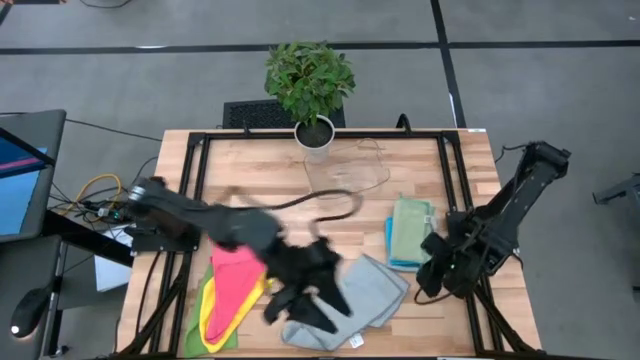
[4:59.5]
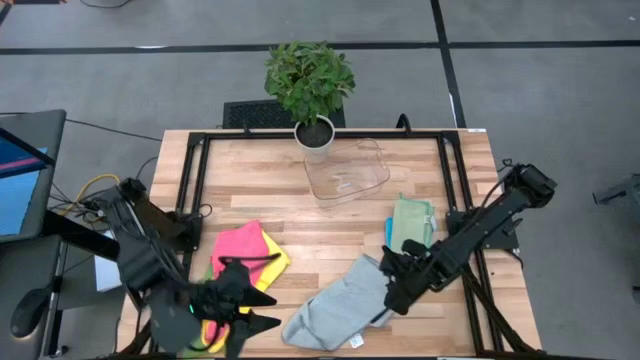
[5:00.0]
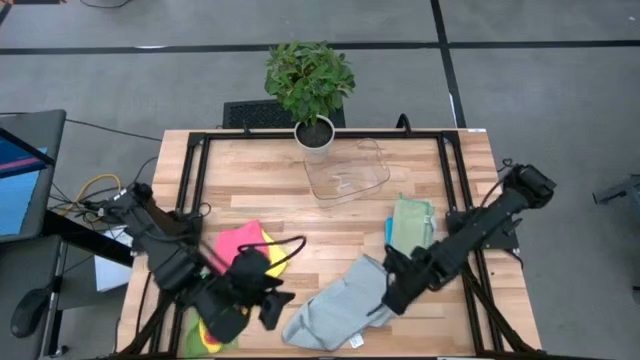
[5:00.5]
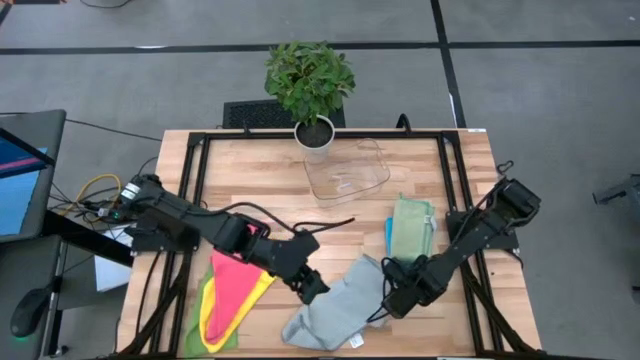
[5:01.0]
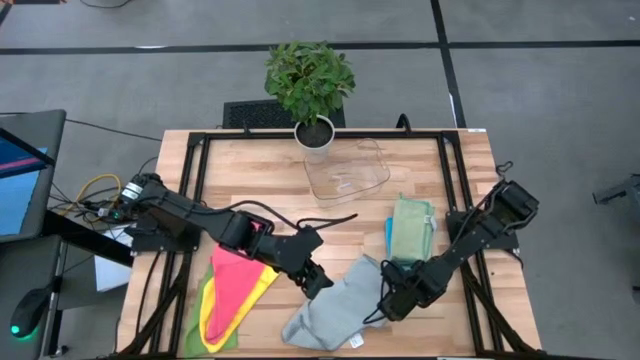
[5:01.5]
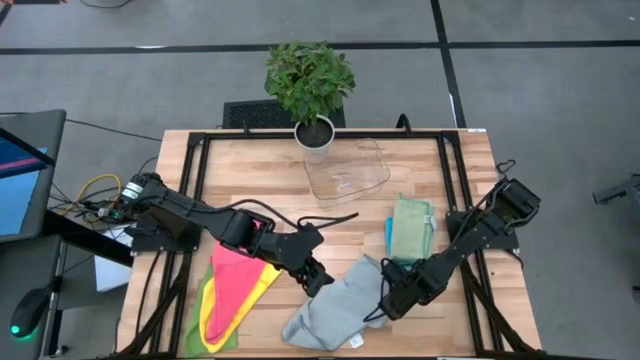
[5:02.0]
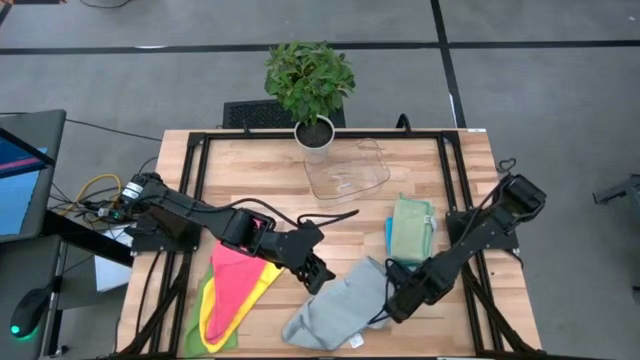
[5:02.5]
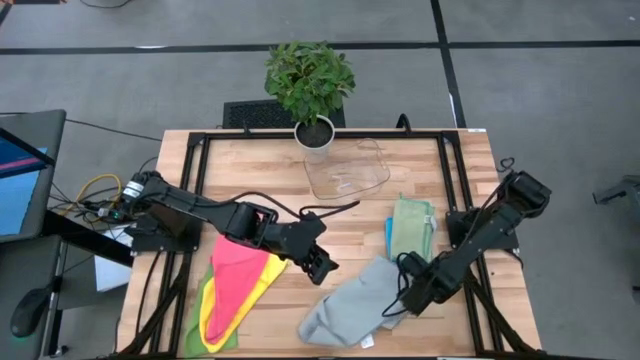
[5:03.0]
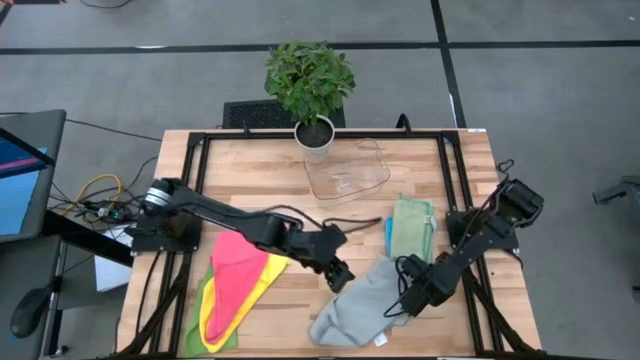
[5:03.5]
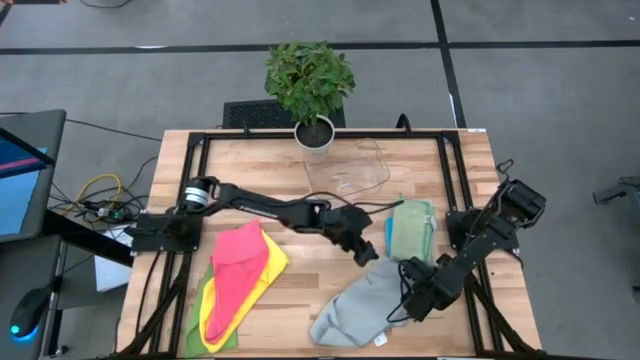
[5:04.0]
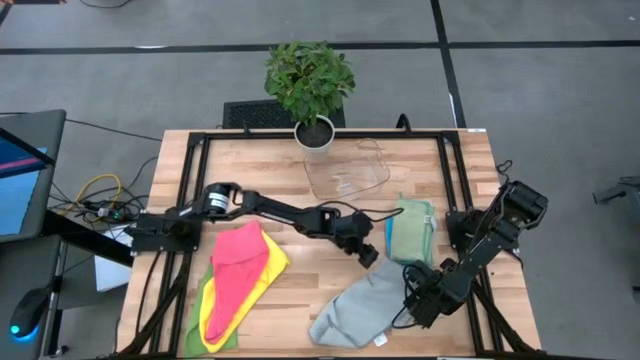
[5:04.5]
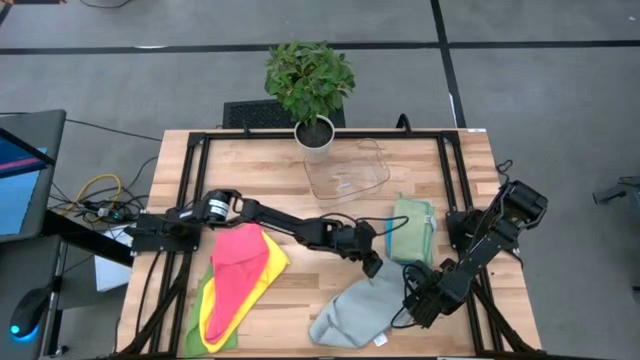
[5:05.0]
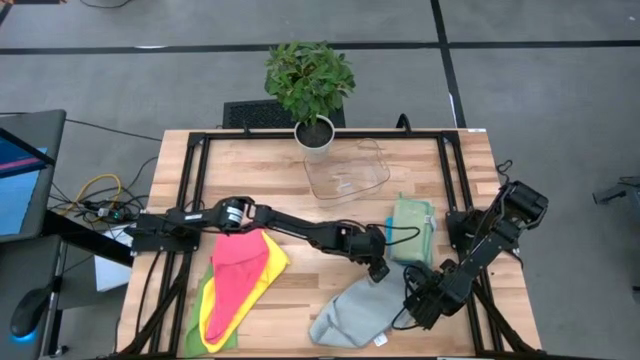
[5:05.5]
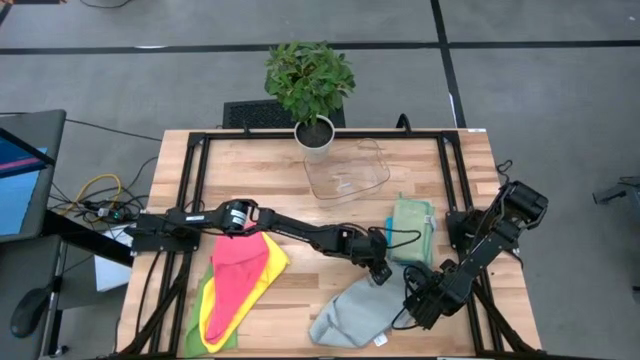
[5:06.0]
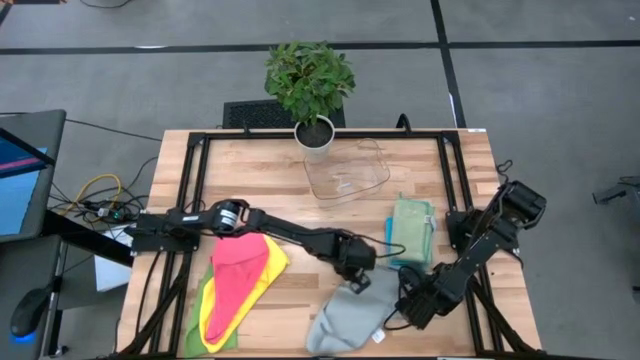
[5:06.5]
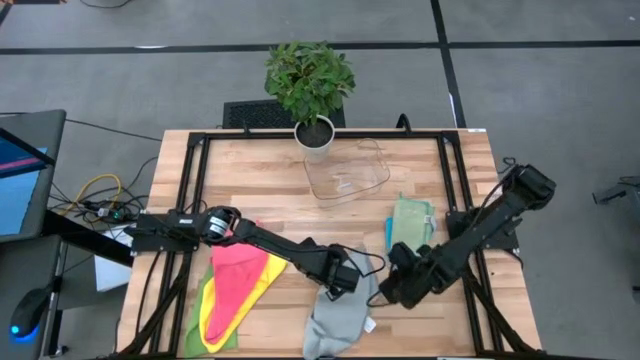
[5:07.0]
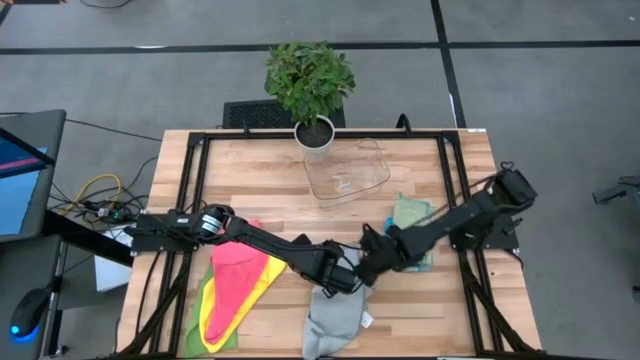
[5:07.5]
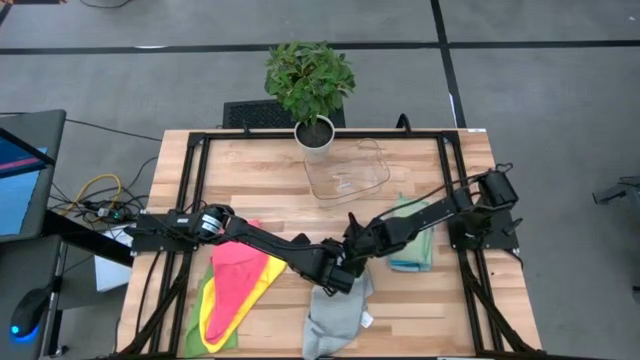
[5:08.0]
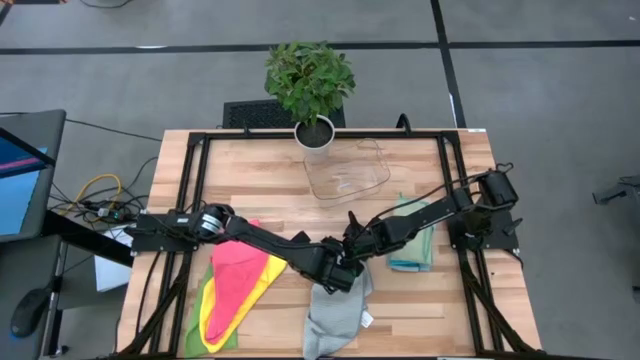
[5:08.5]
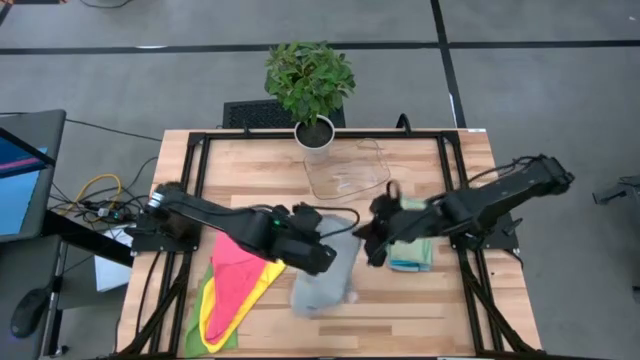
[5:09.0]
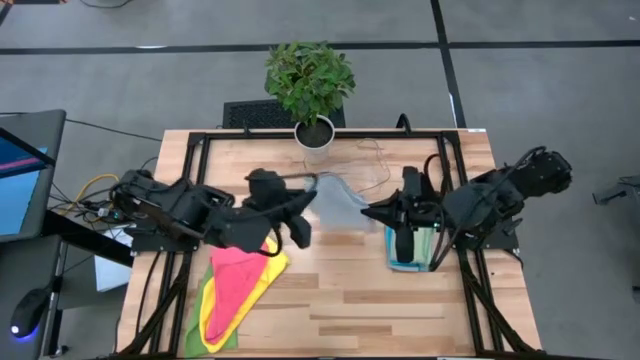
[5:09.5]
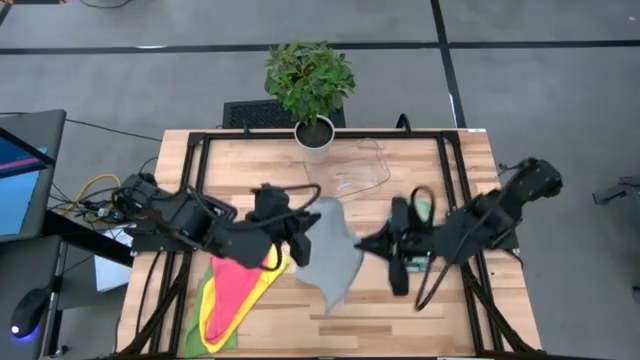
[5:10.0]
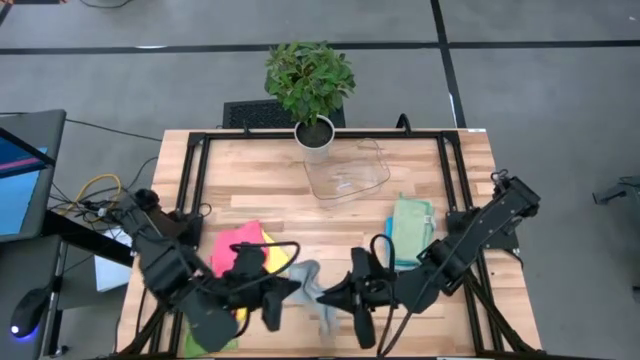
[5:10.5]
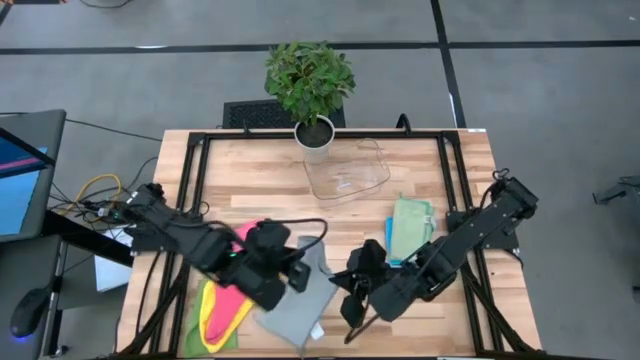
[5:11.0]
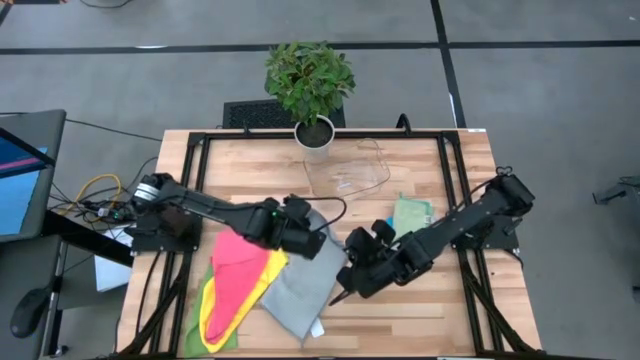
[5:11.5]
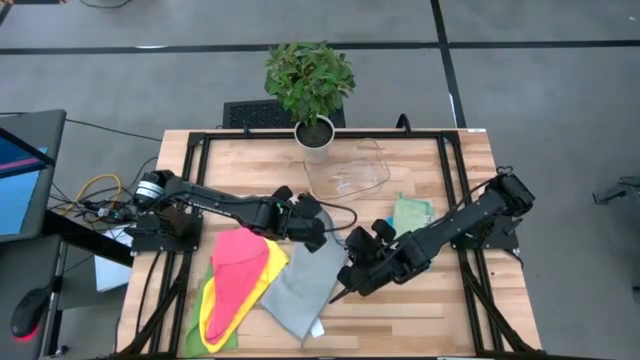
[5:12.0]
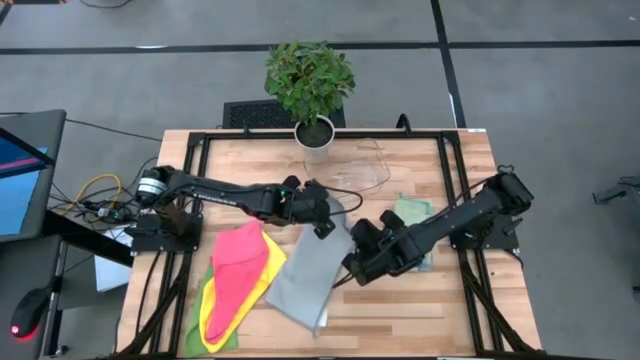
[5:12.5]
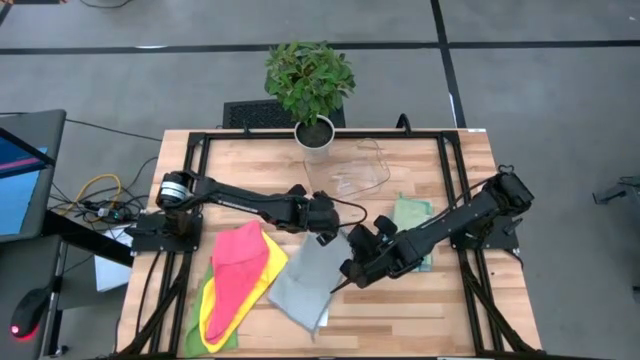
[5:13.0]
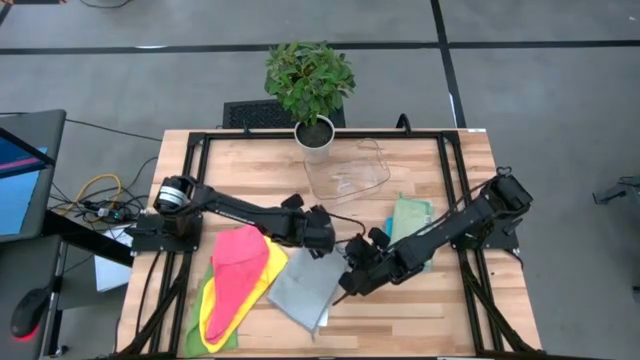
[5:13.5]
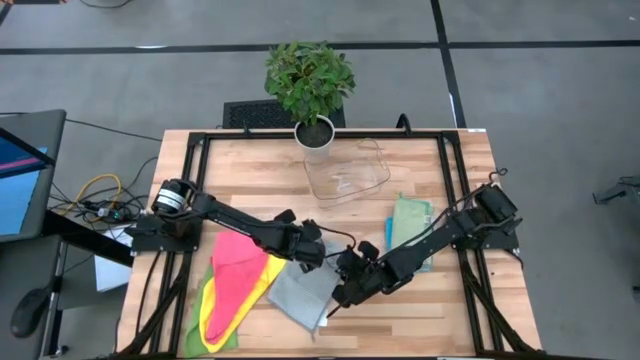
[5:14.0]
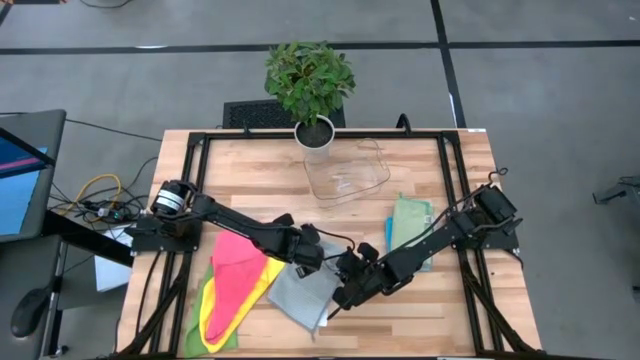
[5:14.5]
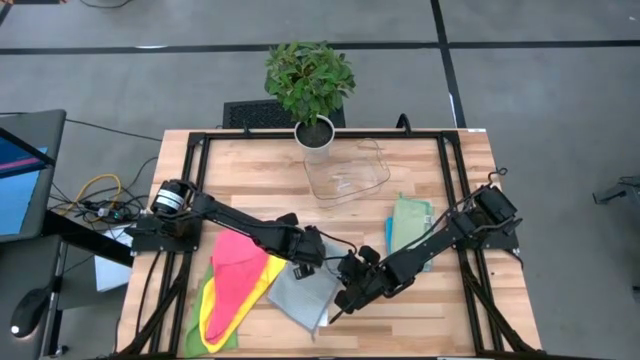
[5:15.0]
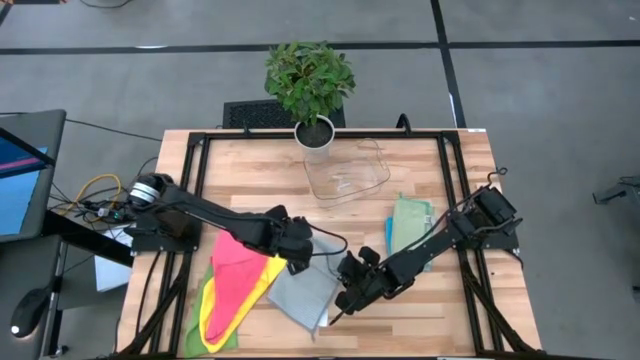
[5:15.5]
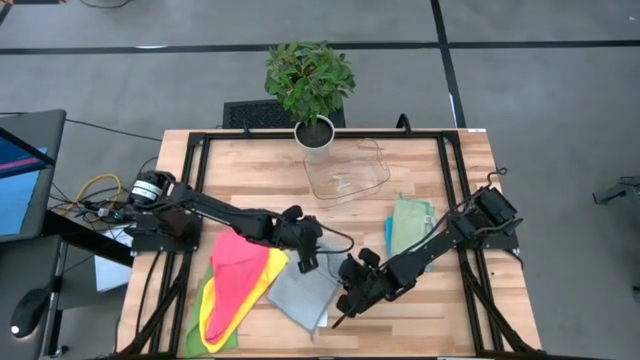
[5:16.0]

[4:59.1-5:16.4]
Task: Fold microfiber towels
Fold the gray microfiber cloth
